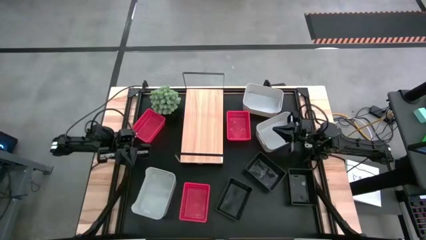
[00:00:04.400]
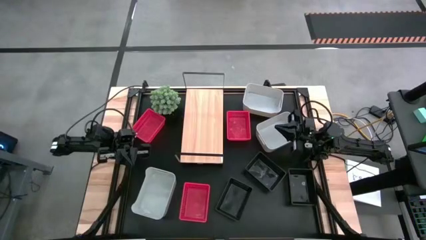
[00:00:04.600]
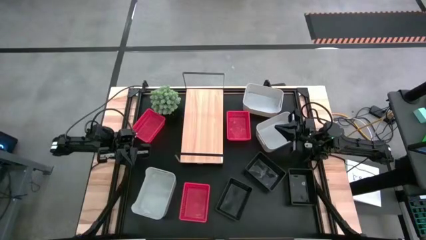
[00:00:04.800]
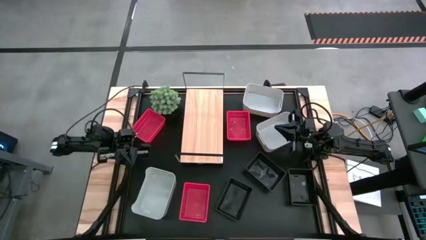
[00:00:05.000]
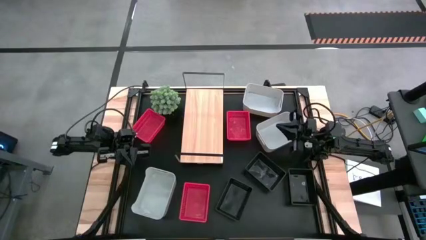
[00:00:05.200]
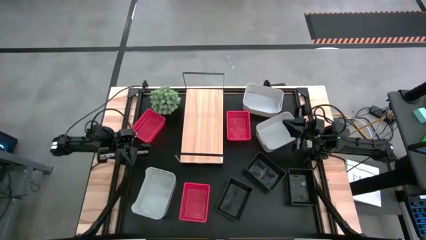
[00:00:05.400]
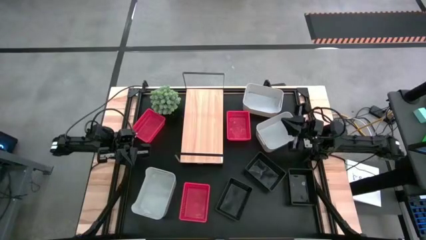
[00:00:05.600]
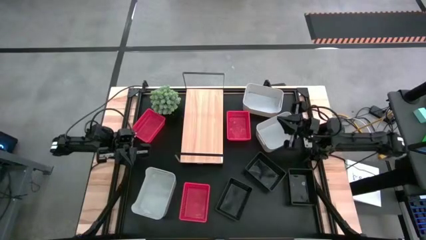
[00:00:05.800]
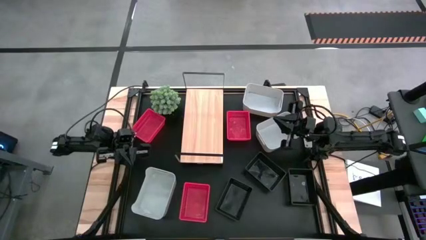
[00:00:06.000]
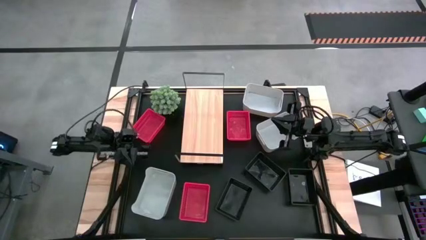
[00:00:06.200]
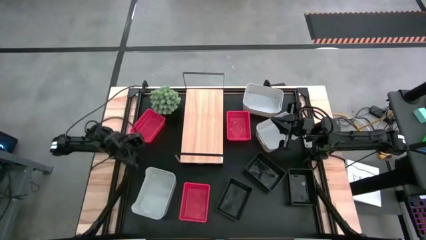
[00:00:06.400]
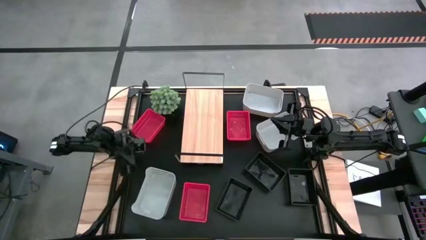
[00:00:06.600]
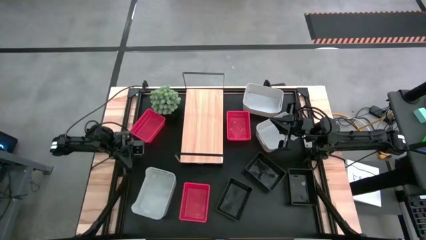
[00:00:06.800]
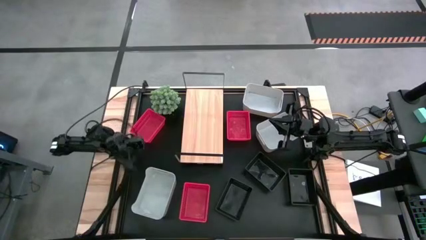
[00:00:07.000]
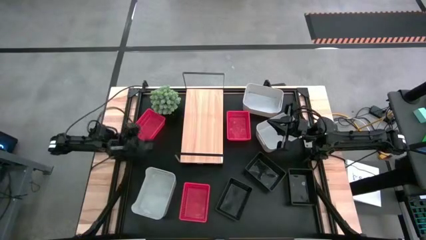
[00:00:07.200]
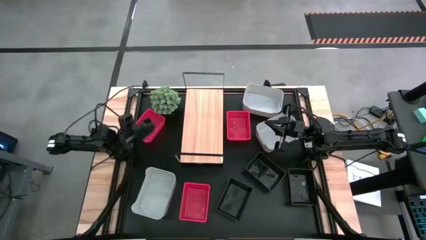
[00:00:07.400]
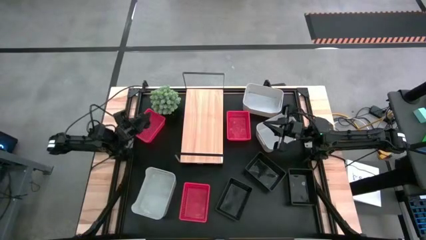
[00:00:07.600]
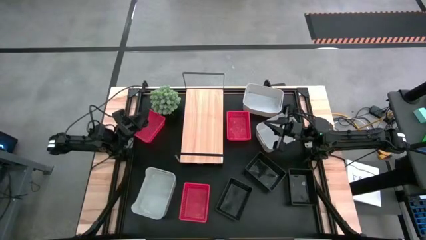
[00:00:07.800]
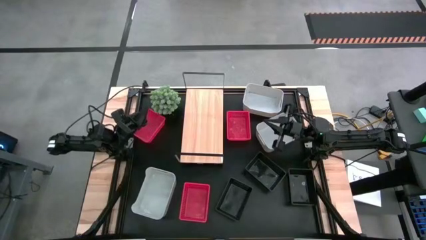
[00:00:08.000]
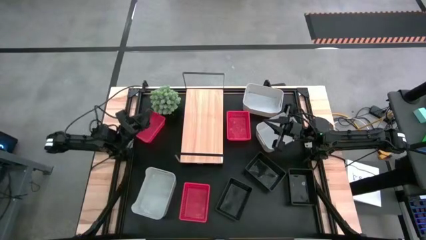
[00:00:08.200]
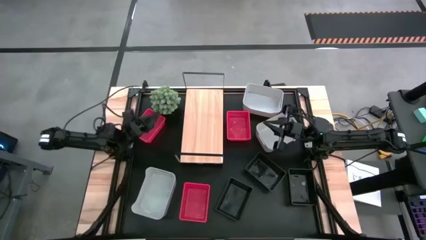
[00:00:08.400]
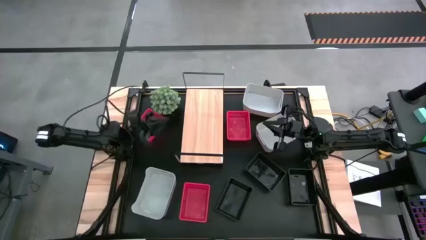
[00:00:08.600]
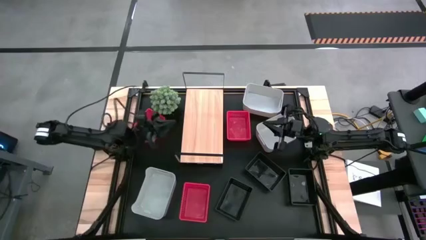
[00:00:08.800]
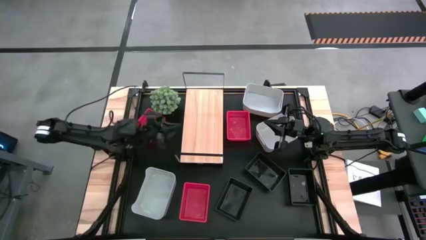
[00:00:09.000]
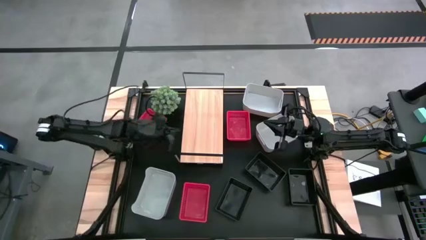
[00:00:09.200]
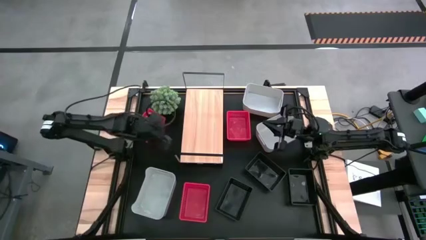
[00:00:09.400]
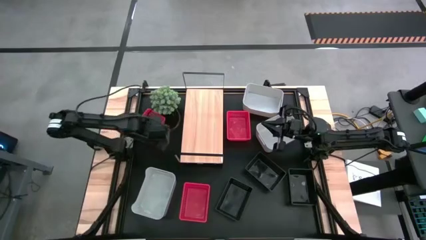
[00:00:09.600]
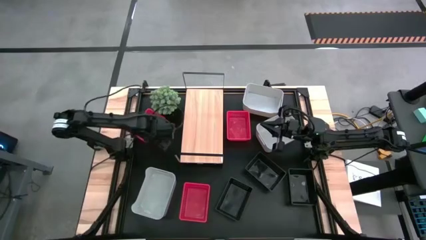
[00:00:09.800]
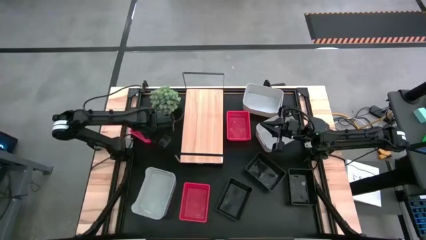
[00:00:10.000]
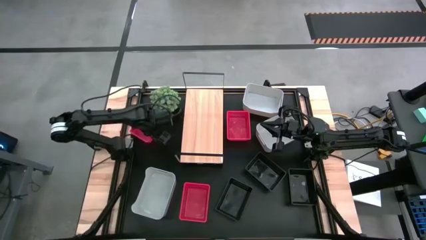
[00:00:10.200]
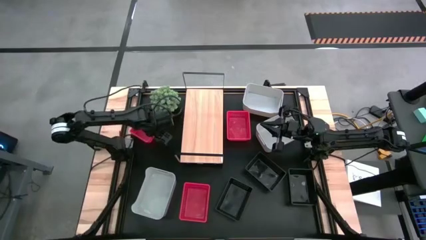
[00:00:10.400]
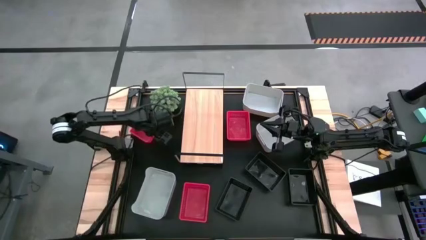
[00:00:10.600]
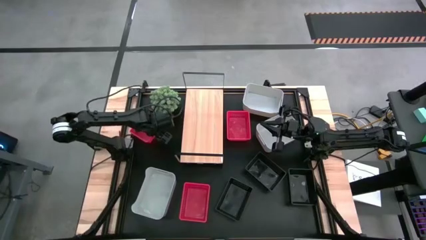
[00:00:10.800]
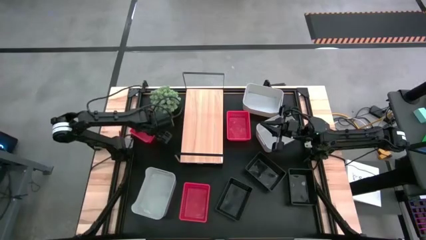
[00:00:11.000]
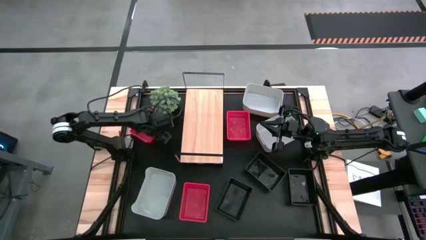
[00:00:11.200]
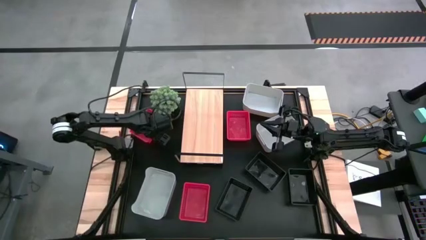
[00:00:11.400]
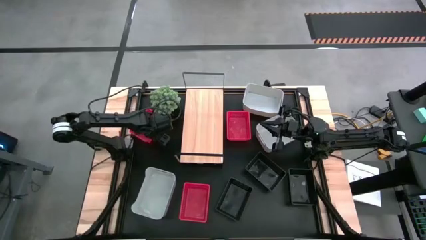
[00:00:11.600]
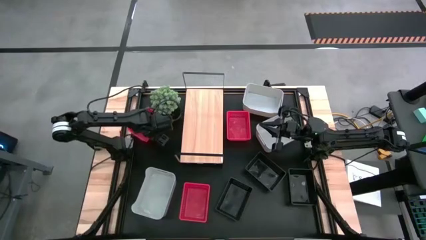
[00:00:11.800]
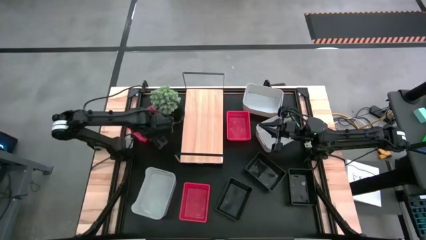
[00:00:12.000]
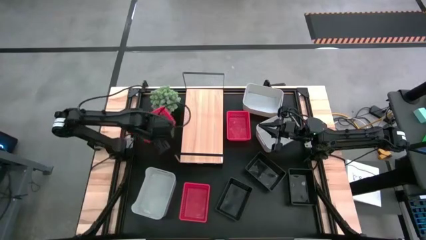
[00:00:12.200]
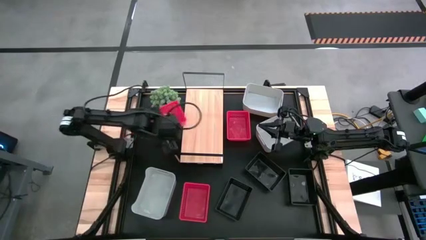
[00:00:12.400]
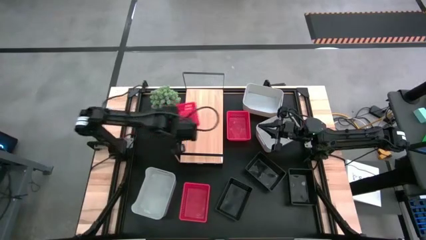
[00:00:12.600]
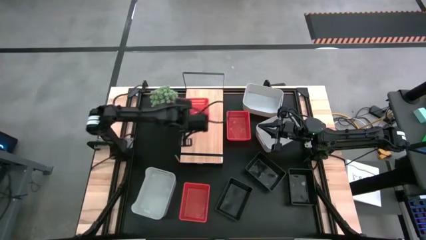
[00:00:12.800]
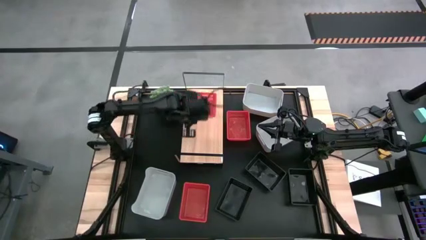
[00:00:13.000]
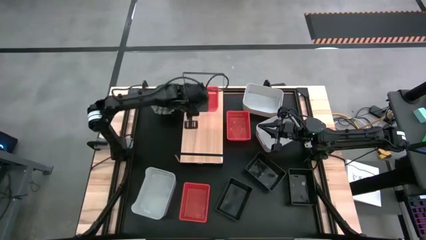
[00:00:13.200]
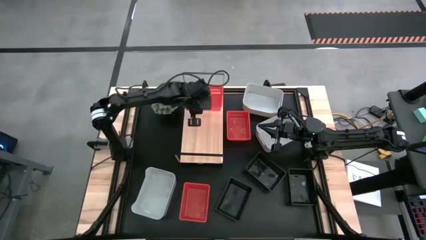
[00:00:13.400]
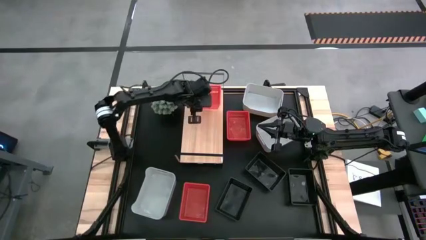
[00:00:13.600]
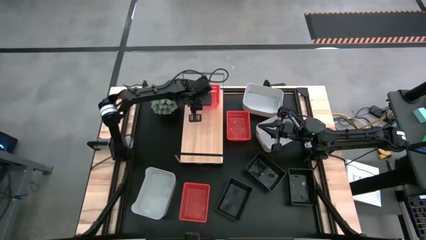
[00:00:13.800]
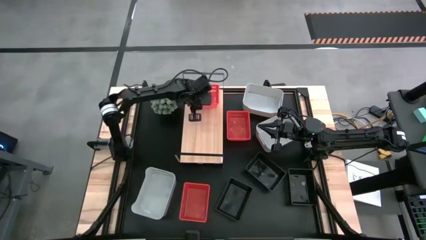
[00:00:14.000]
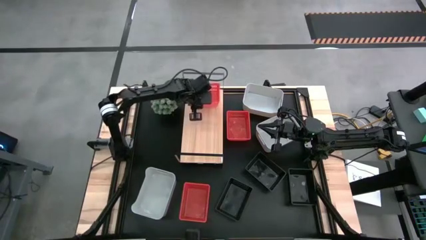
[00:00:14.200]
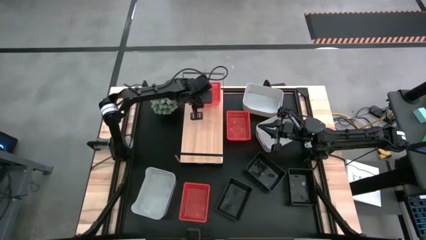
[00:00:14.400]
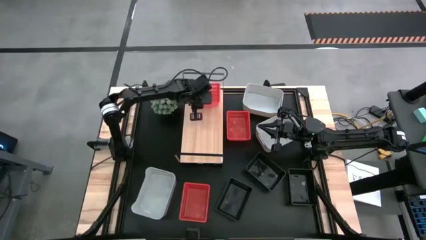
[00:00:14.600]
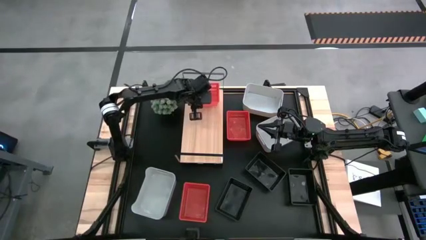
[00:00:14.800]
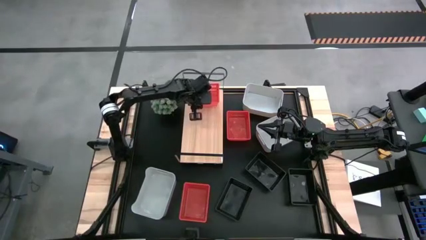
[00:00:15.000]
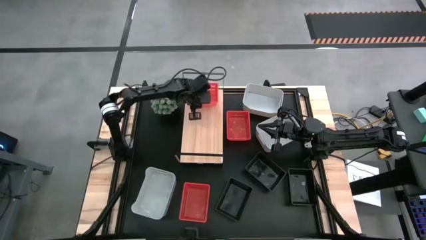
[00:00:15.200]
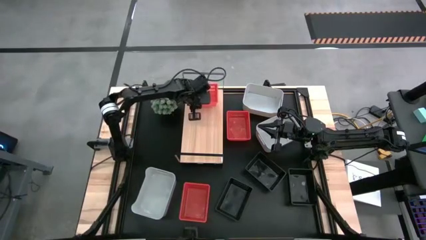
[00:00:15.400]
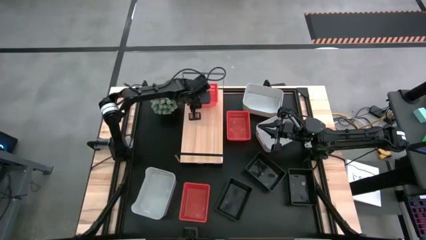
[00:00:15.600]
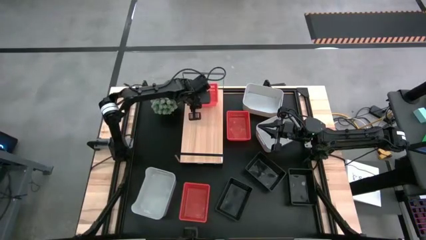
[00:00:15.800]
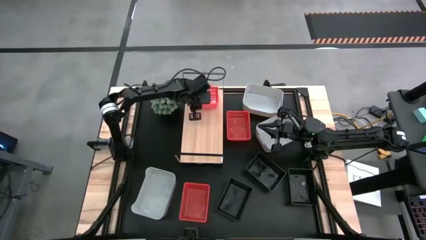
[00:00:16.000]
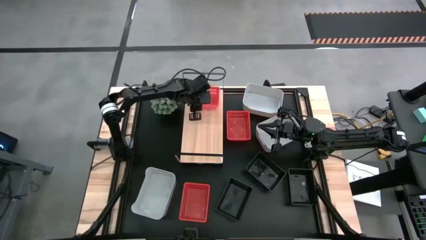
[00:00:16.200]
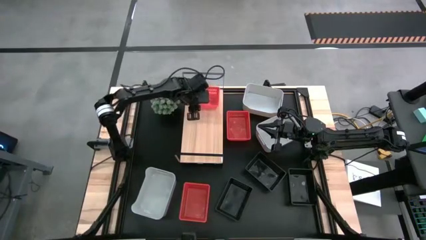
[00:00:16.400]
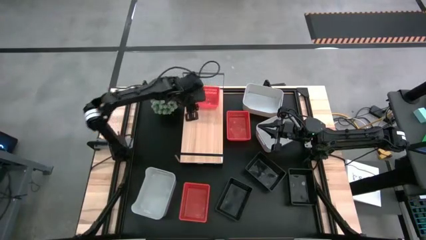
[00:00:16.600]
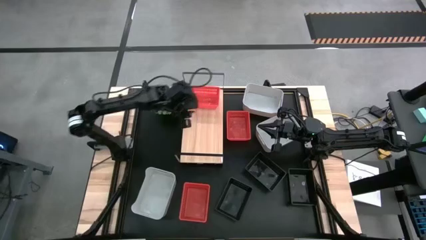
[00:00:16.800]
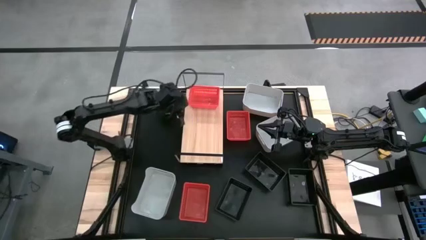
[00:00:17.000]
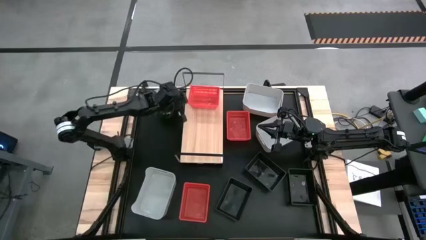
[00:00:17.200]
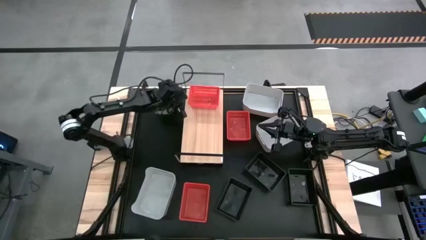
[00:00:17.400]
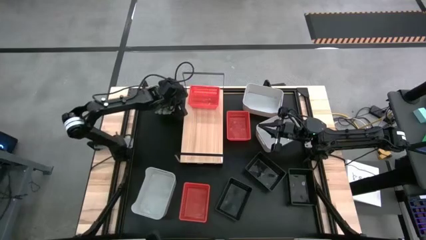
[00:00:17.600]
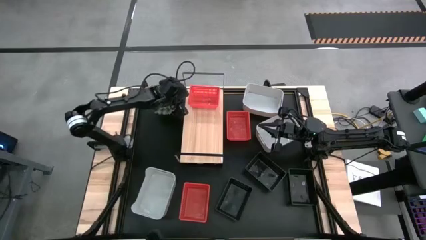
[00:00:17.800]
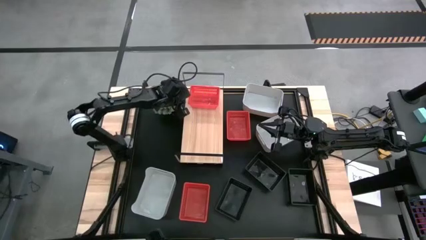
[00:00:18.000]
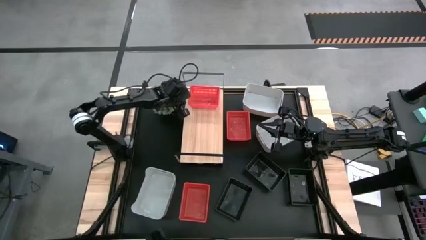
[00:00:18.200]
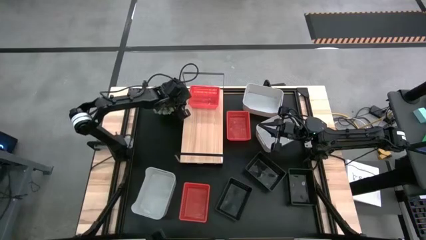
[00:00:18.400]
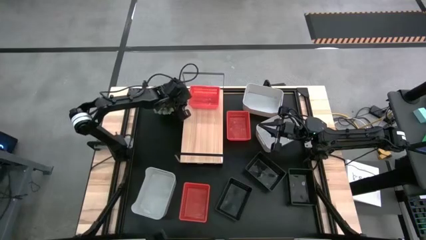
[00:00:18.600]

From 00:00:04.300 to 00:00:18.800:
Task: Stack baskets on shelf by color
Put the top left red bin on the shelf
